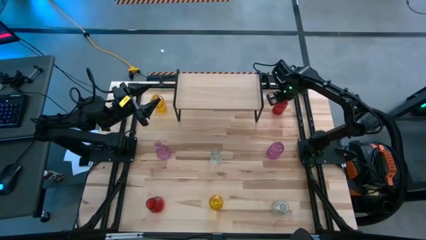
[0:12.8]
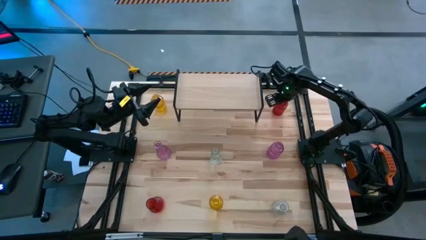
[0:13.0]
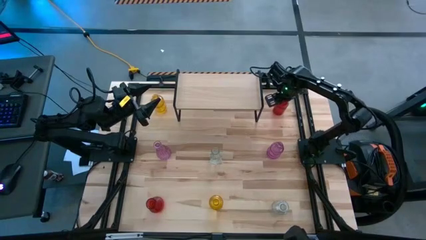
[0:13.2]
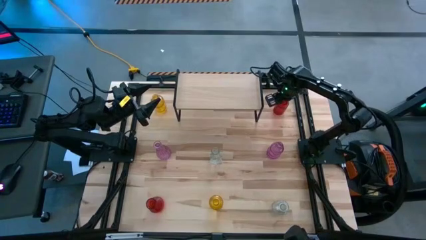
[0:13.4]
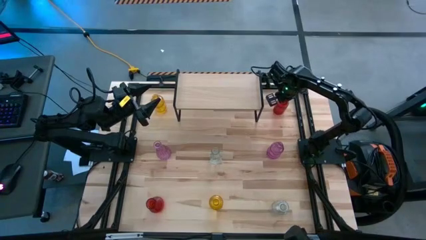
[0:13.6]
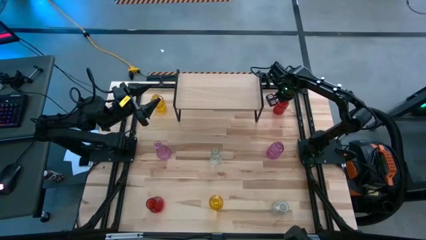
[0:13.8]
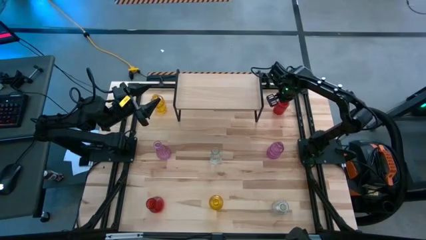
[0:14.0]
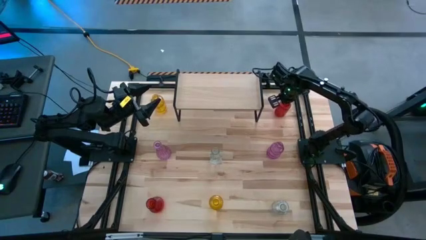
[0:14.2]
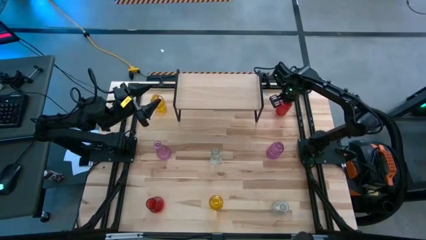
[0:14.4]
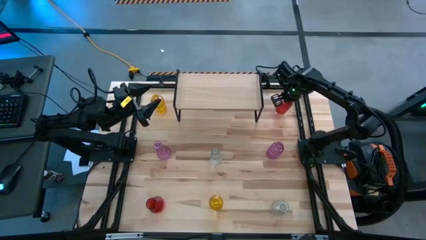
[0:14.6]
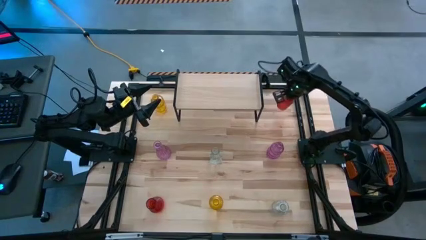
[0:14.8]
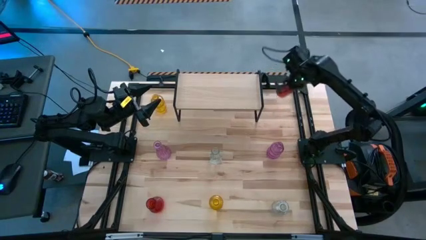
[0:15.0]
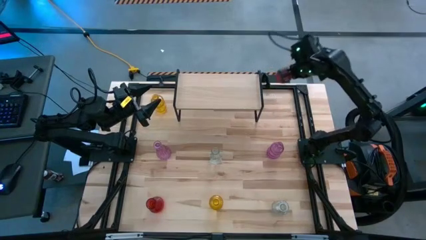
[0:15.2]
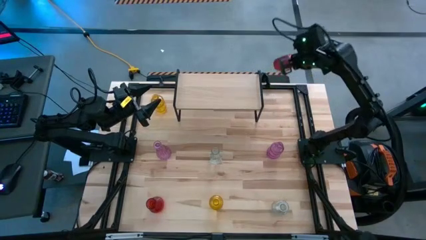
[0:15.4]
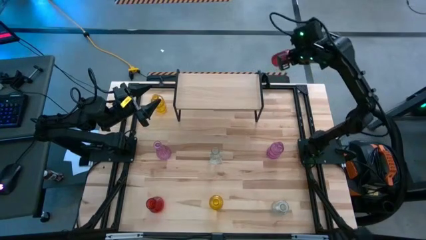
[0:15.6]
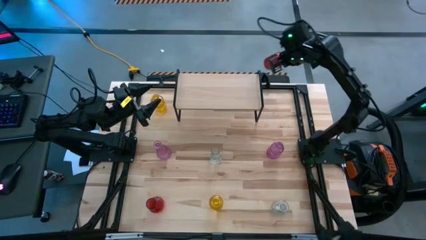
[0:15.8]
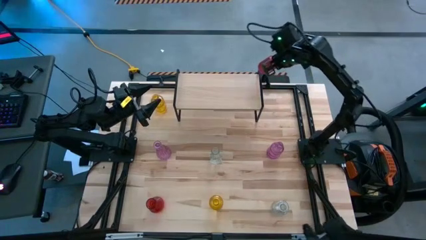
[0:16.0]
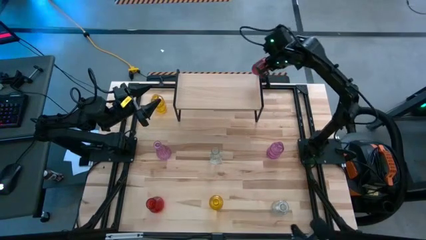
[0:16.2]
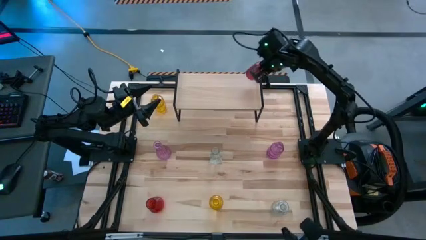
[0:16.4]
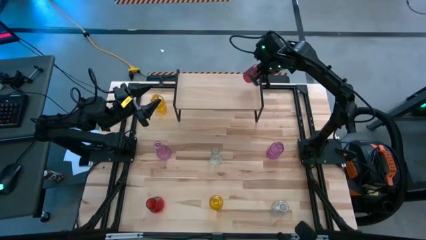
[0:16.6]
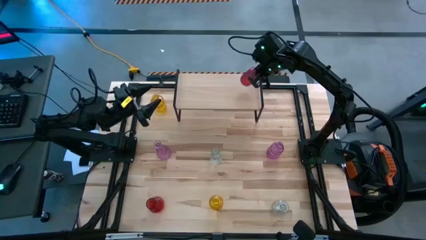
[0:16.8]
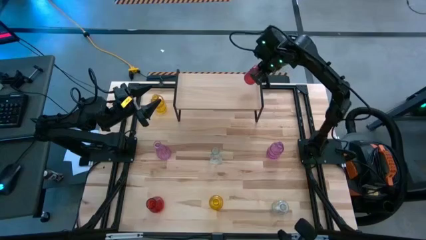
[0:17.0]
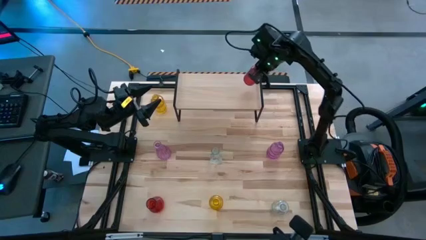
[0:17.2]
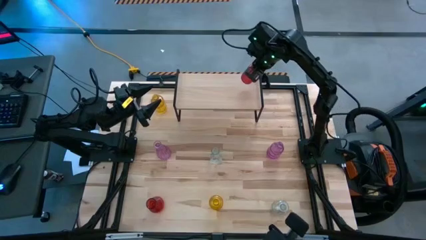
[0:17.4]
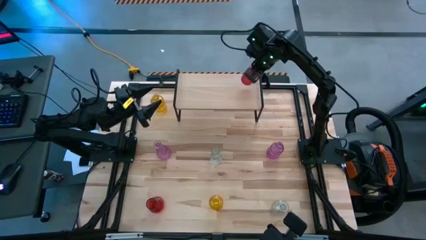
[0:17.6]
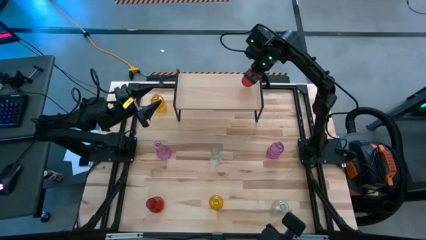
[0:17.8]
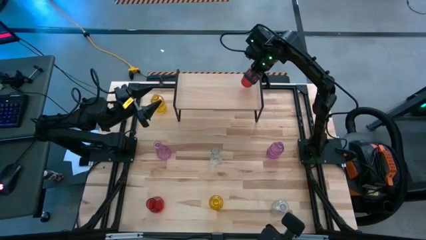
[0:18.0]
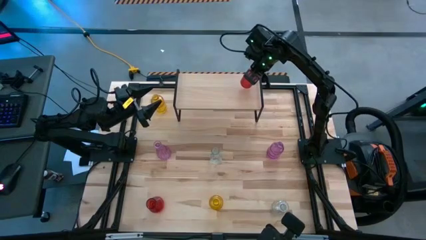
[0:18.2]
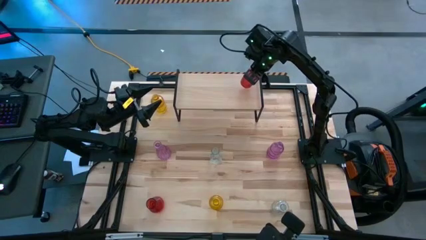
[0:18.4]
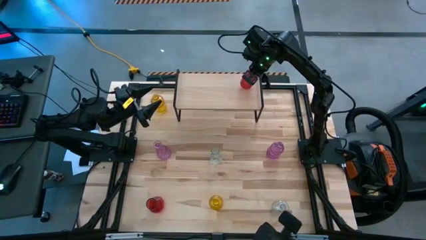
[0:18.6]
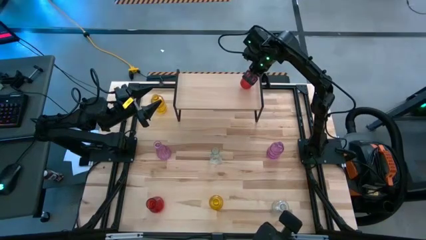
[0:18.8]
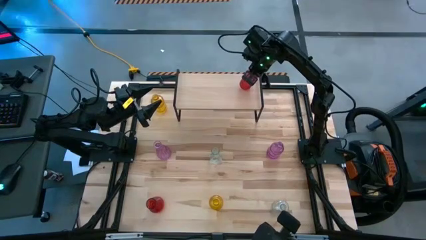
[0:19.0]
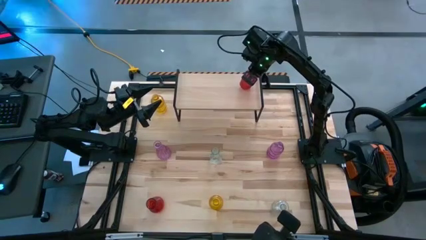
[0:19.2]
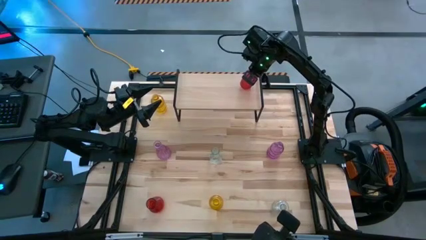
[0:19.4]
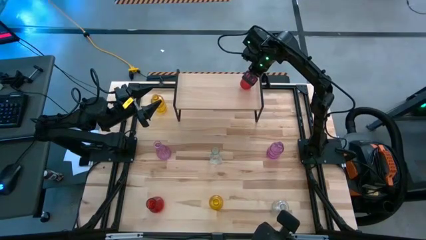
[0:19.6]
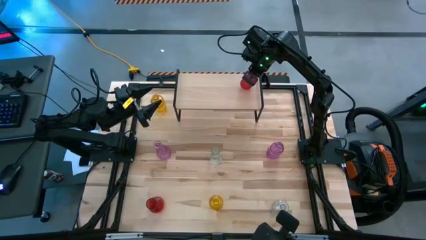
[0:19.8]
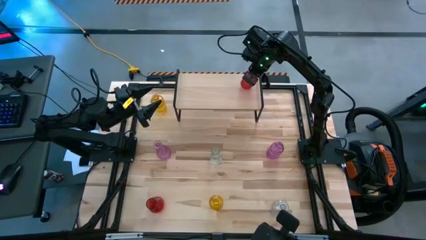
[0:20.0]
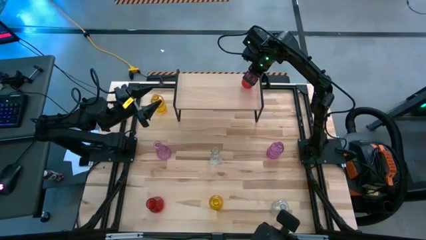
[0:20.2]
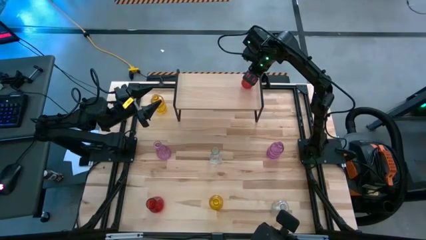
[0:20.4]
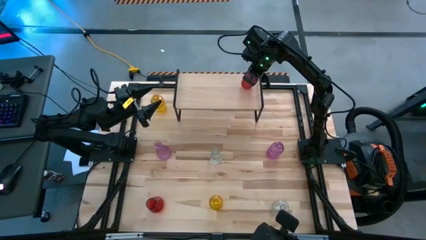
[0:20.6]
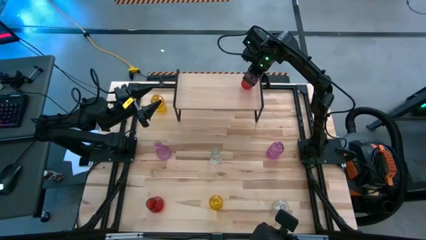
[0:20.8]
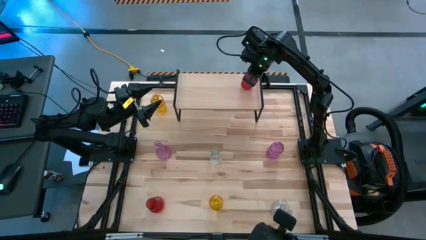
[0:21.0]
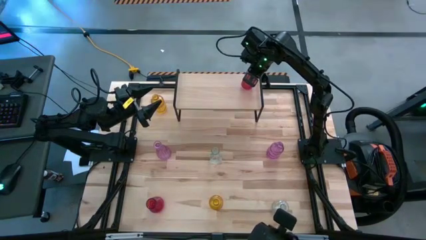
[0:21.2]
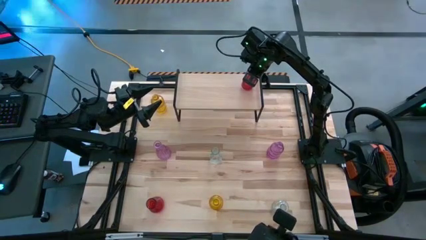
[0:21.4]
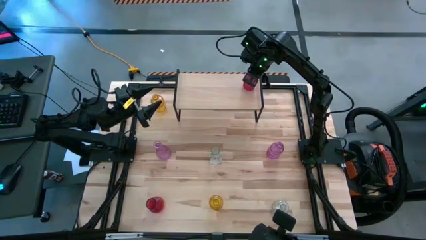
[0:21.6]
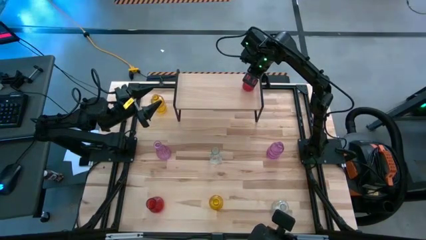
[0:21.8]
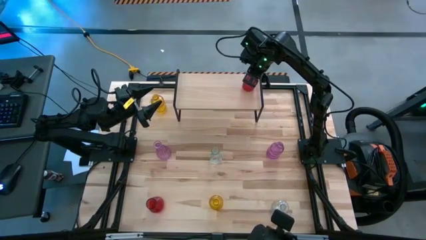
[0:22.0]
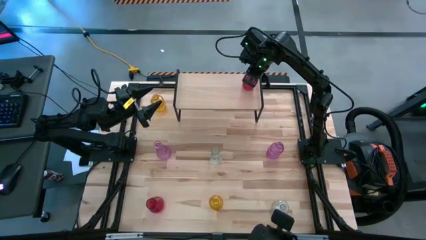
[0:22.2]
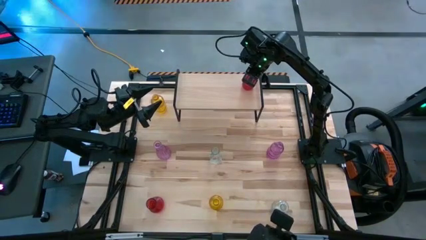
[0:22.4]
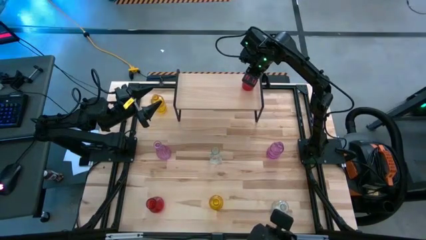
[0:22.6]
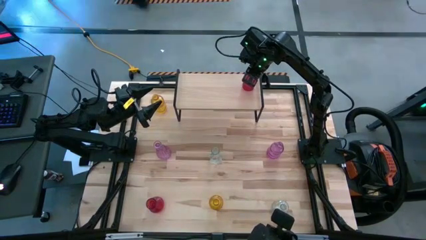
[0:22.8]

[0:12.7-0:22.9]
Task: sort vases onto shelf
Put the top red vase on the shelf
